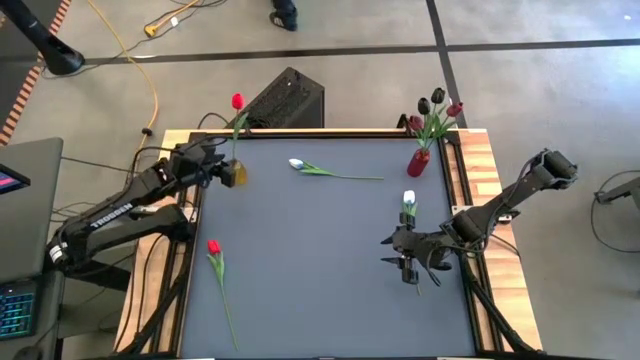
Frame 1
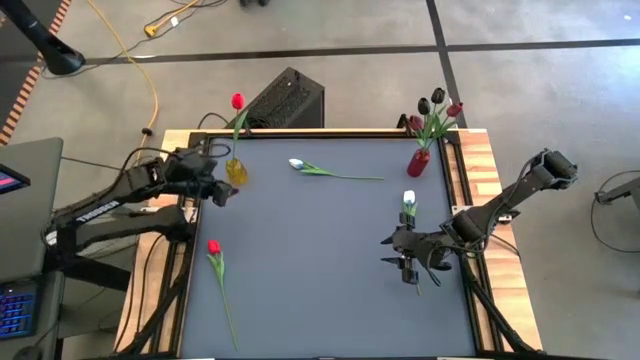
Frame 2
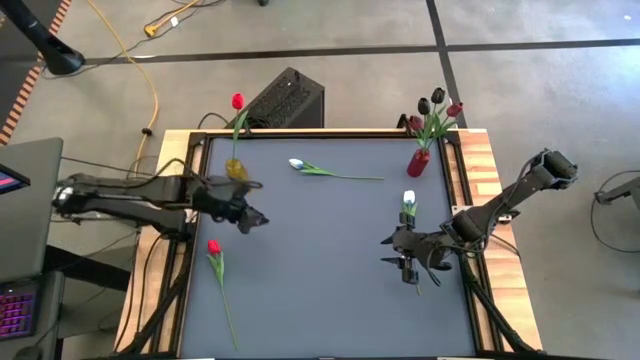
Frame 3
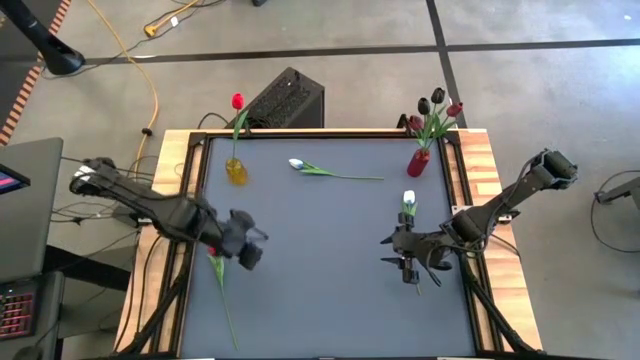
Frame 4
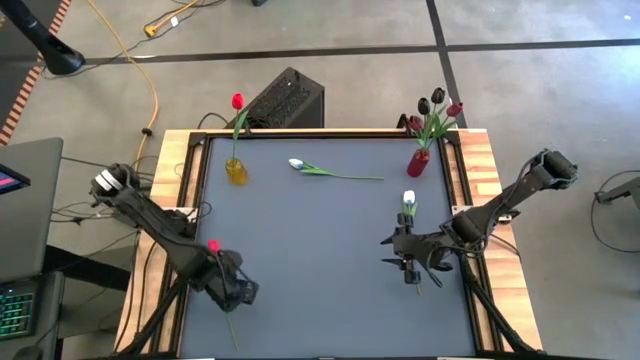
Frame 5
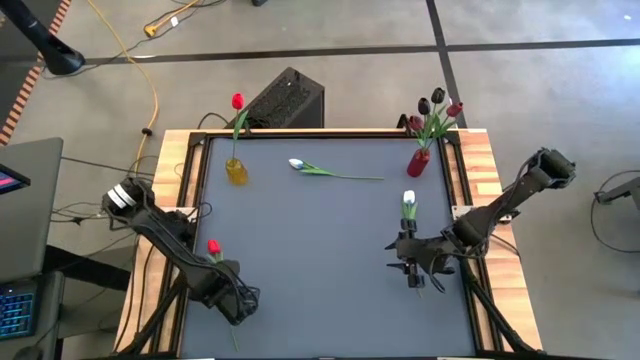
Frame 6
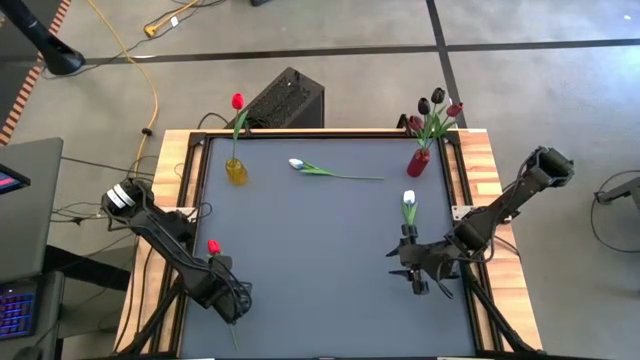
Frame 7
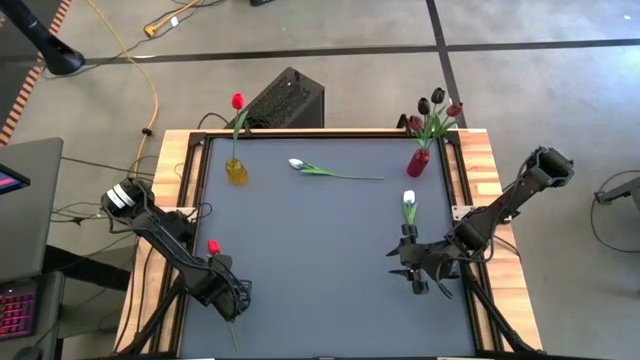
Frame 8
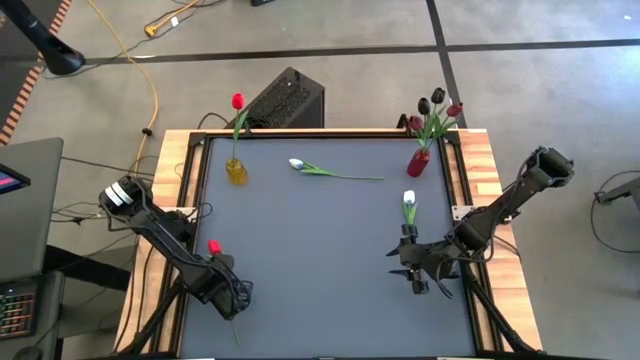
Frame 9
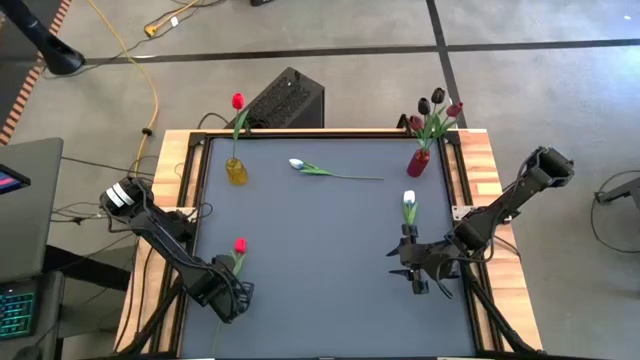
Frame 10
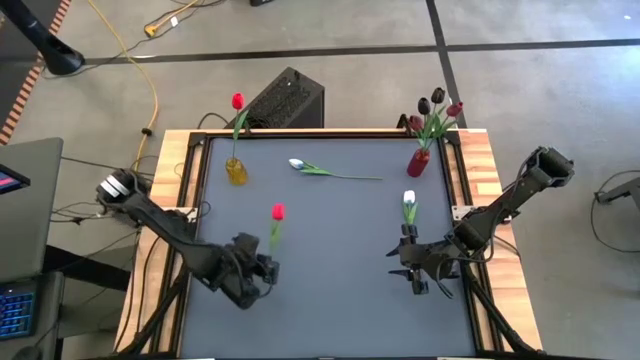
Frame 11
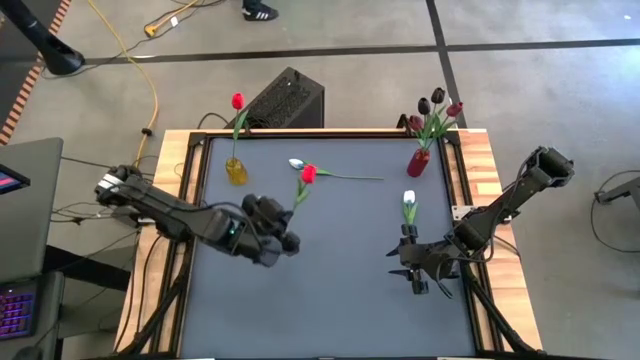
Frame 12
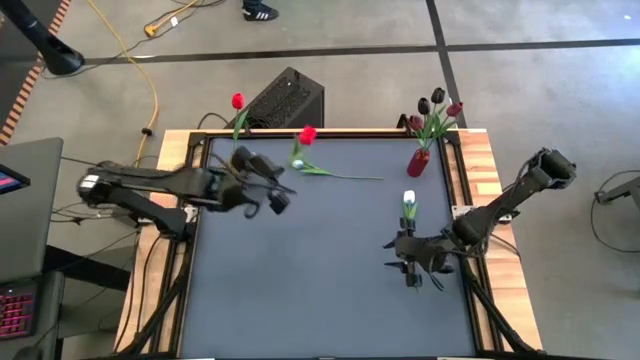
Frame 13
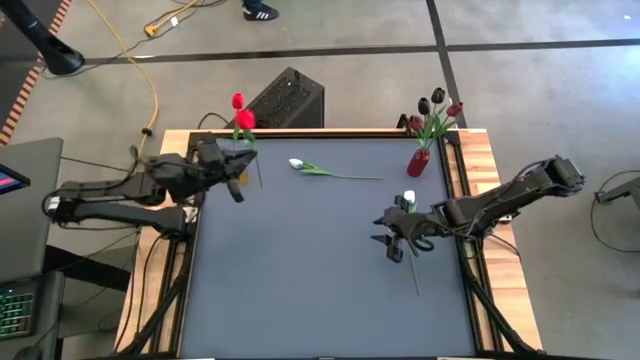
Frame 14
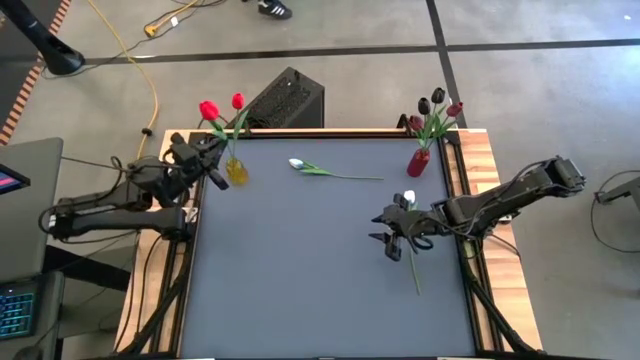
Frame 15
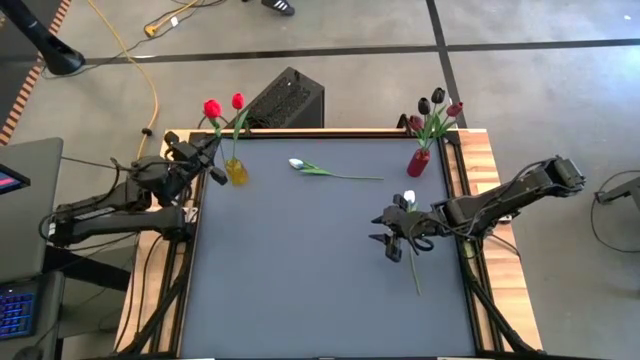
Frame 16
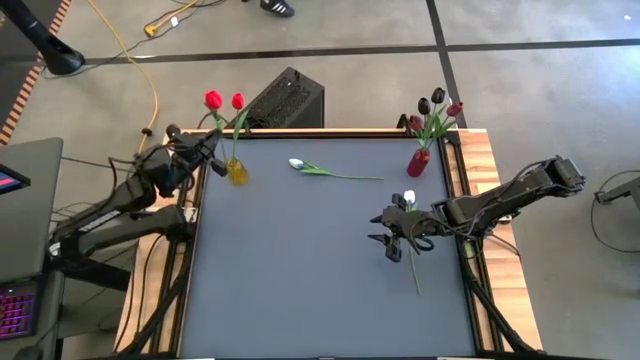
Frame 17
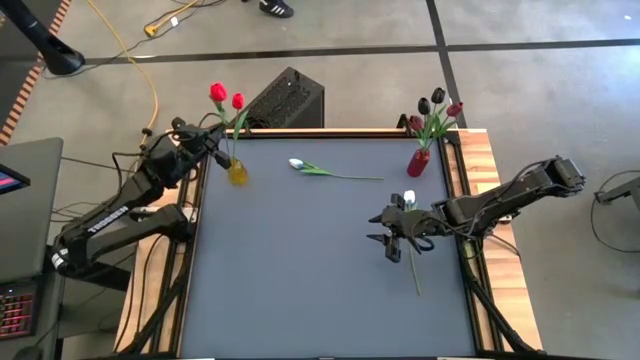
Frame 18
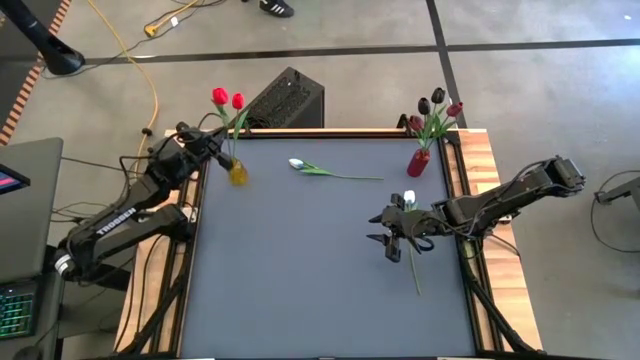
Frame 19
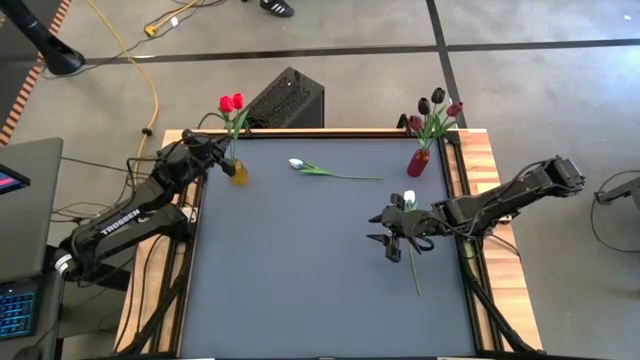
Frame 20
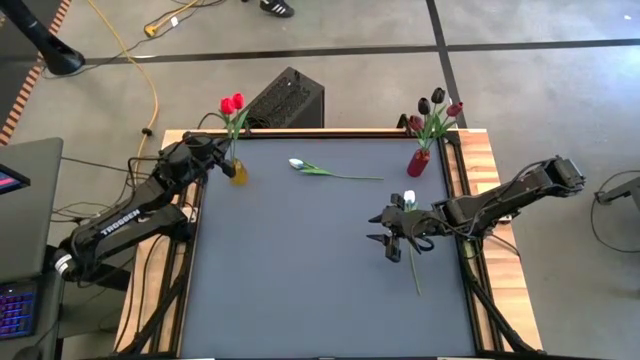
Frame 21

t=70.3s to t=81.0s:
Task: Sort flowers into vase by color
Put the red tulip into the yellow flower vase

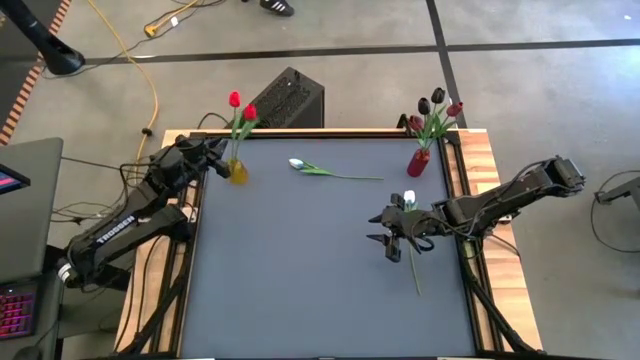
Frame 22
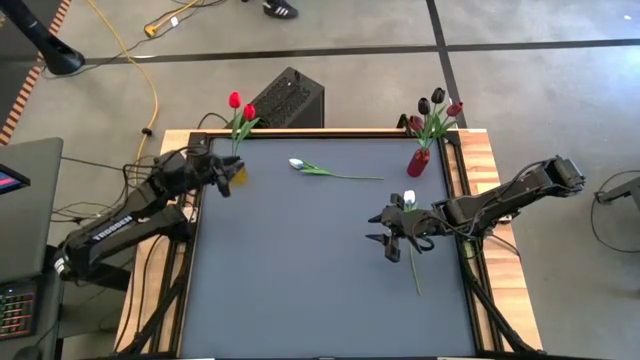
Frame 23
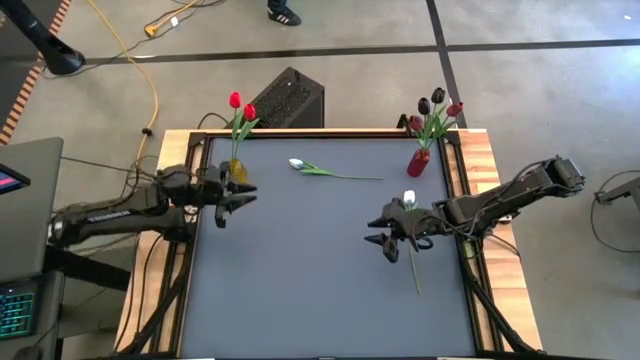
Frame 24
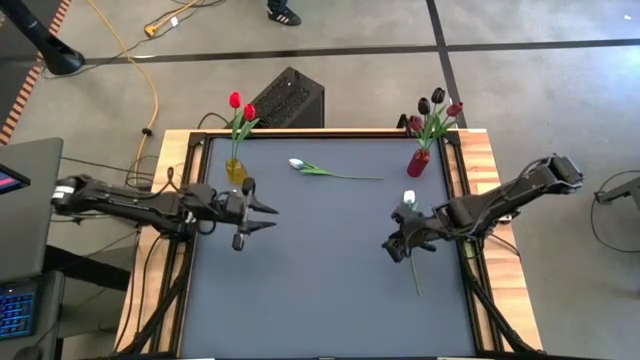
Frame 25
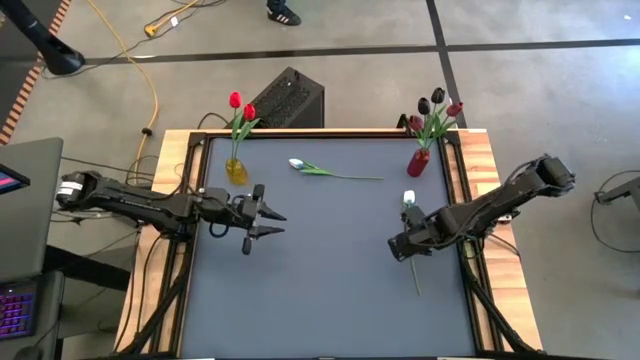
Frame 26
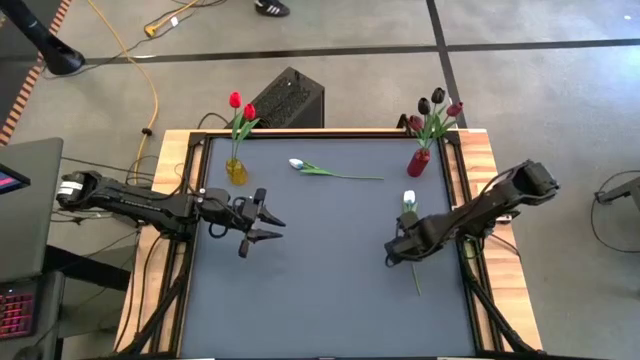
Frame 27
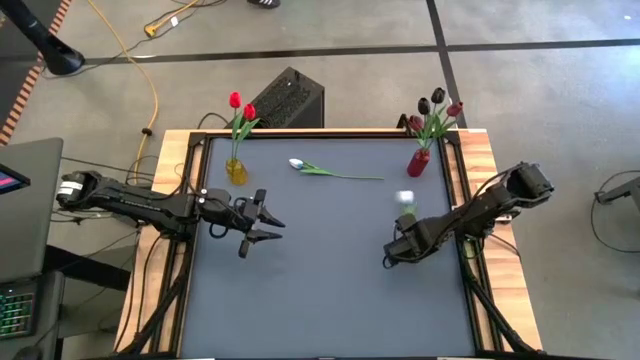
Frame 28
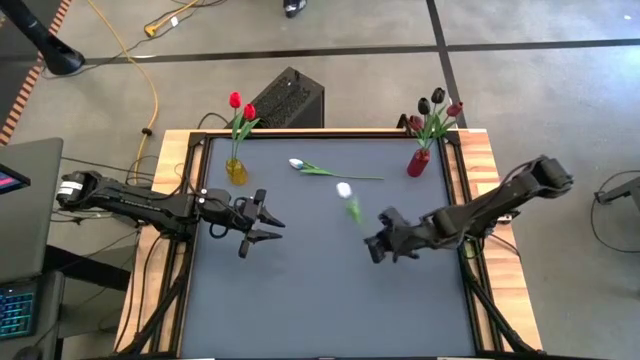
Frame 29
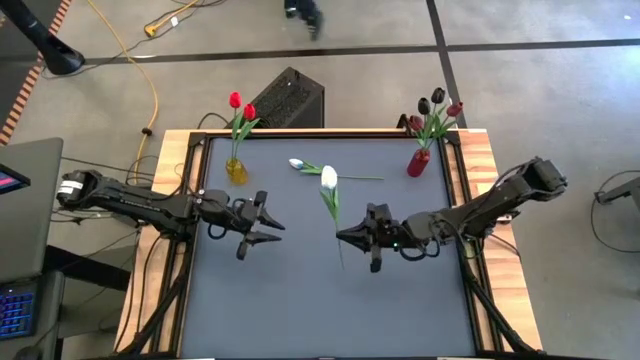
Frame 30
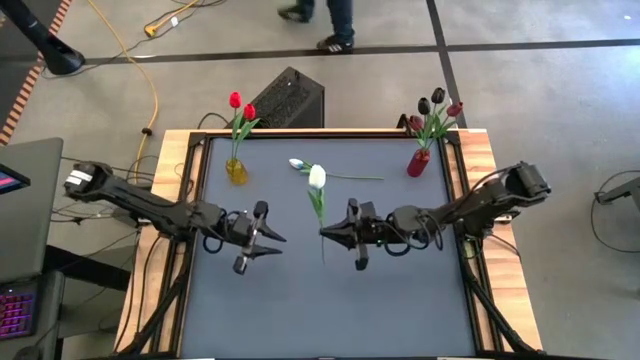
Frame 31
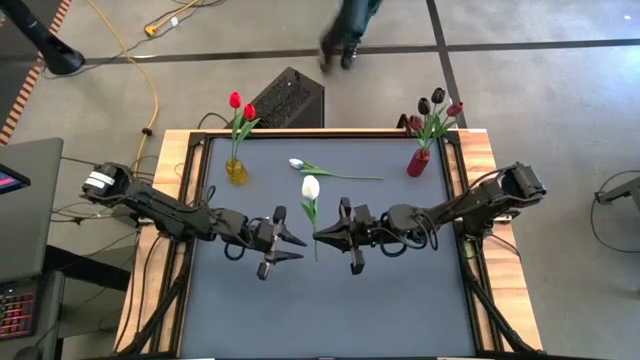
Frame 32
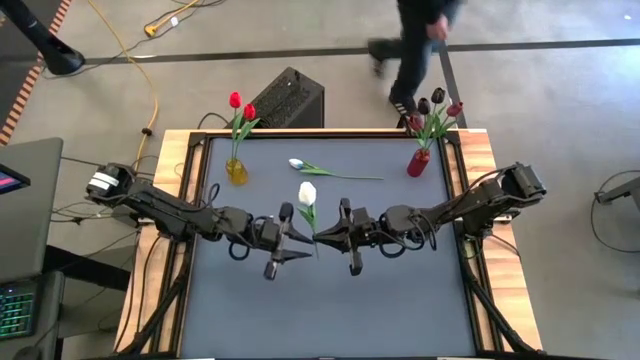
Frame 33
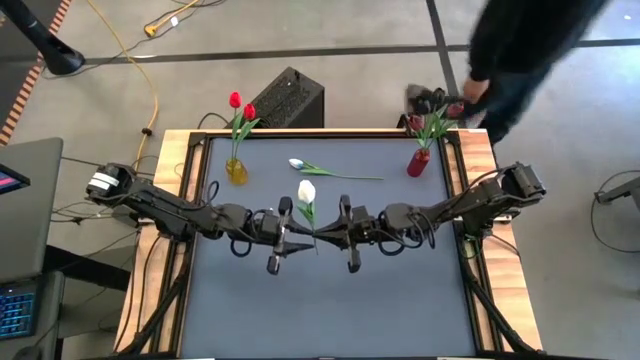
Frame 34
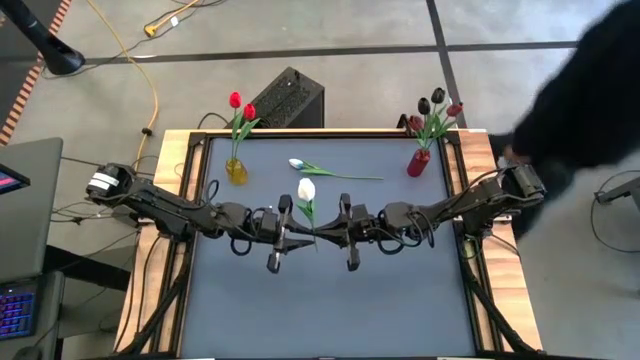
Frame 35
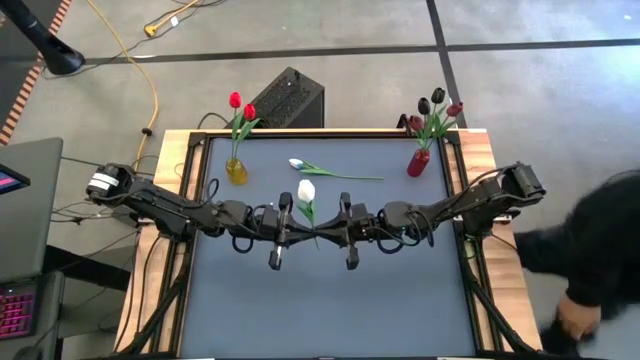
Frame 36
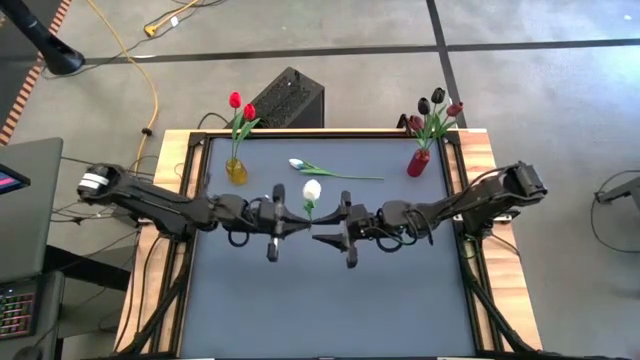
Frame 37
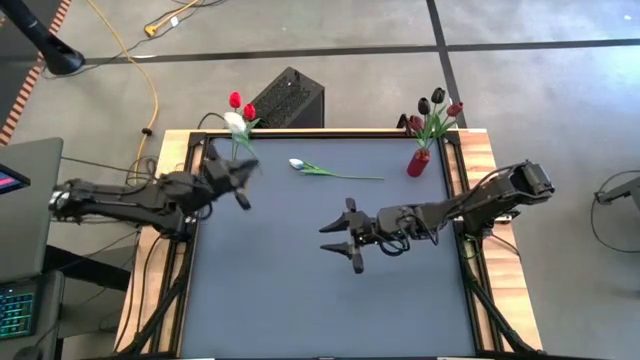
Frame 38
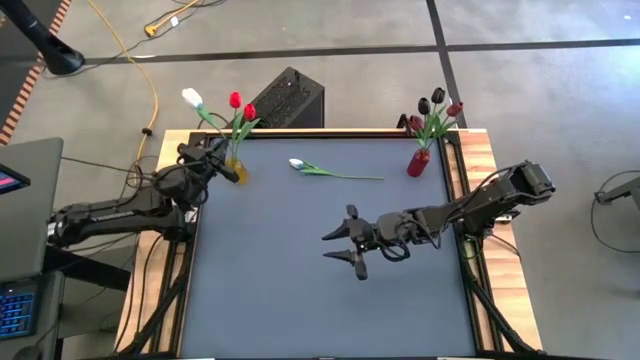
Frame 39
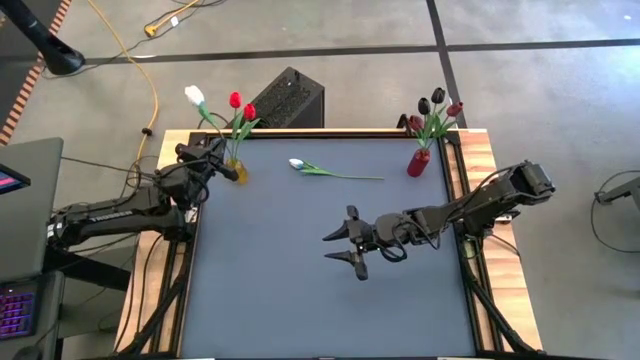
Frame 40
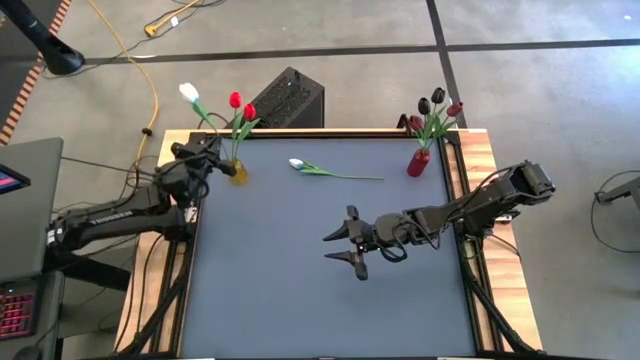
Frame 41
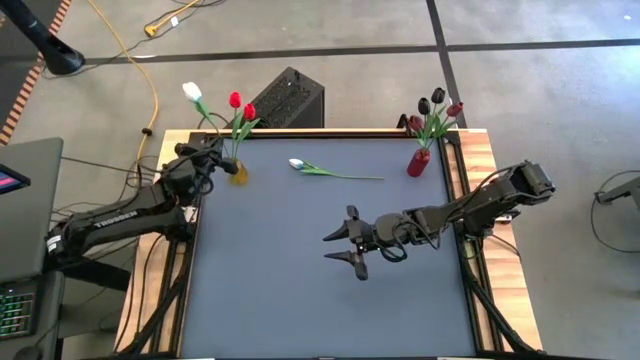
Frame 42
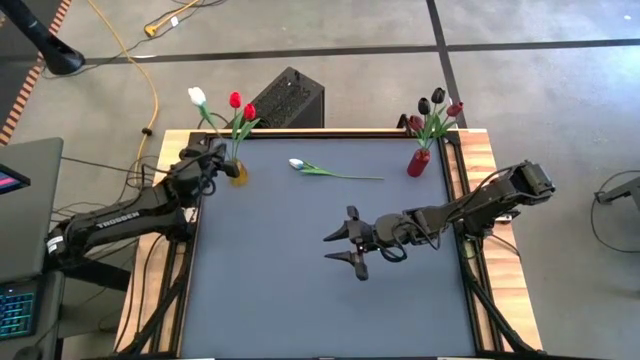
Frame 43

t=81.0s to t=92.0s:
Put the bottom white tulip into the yellow flower vase
